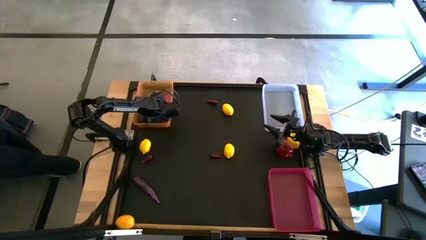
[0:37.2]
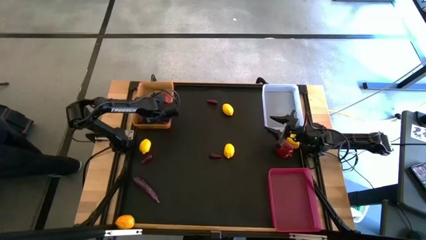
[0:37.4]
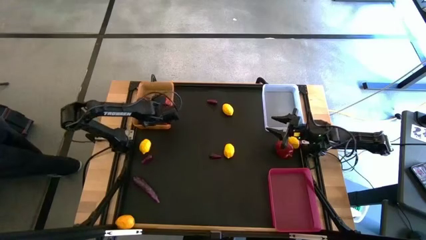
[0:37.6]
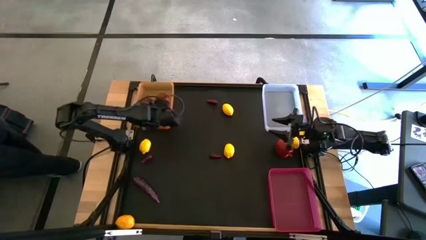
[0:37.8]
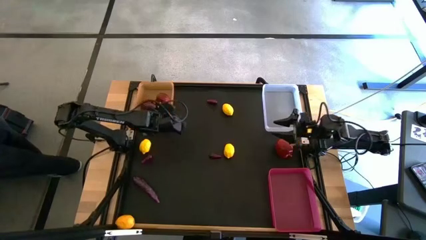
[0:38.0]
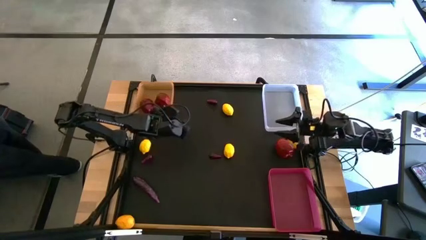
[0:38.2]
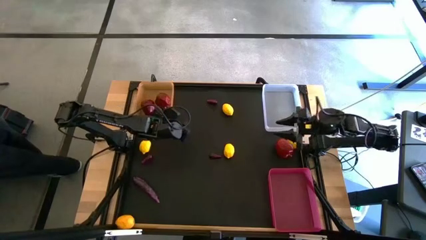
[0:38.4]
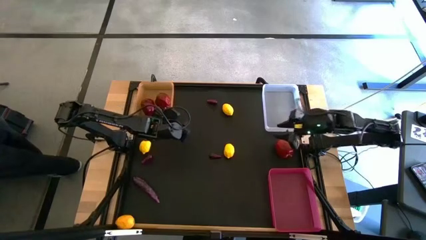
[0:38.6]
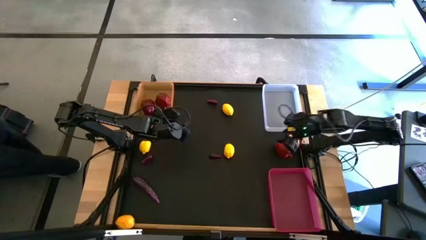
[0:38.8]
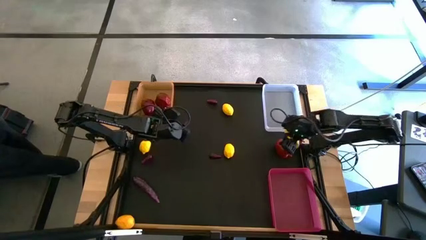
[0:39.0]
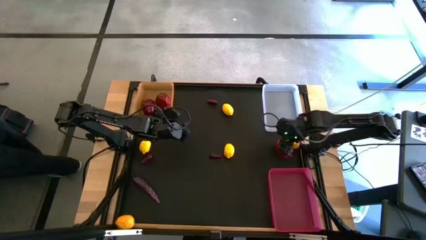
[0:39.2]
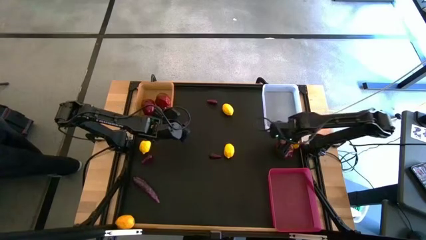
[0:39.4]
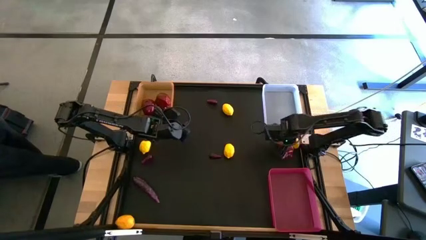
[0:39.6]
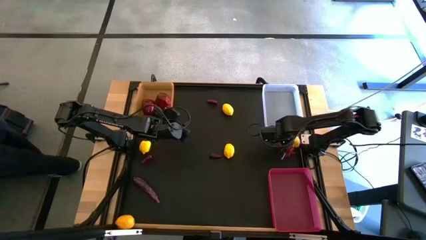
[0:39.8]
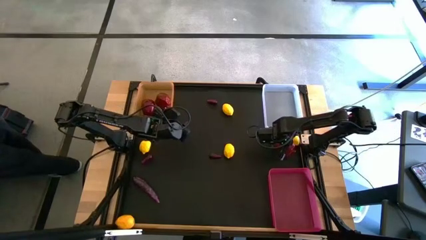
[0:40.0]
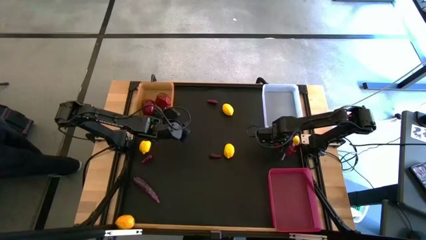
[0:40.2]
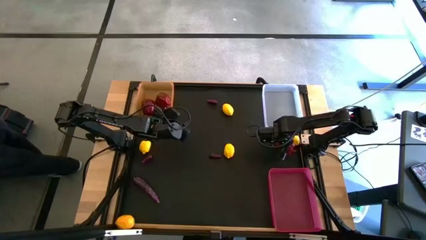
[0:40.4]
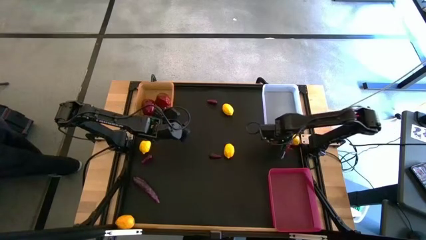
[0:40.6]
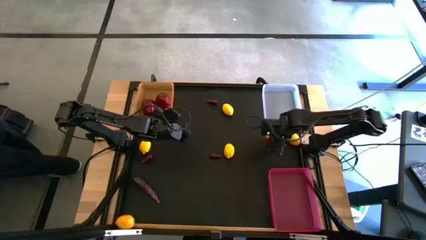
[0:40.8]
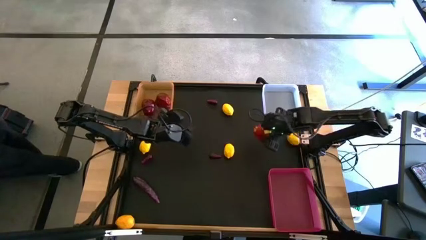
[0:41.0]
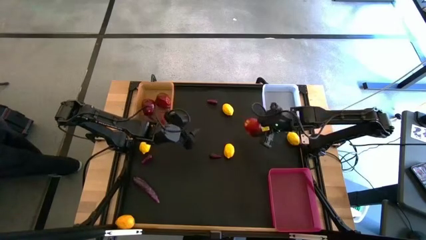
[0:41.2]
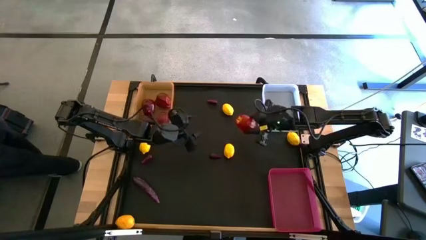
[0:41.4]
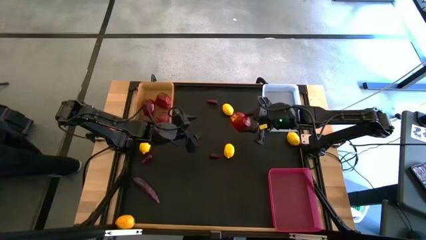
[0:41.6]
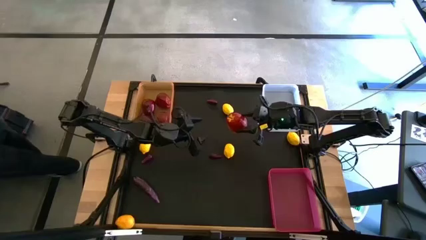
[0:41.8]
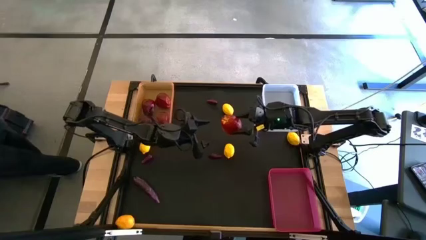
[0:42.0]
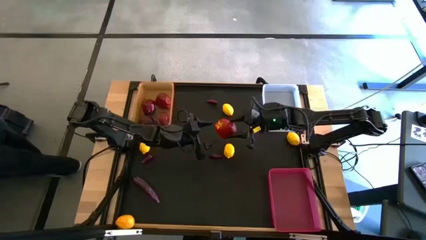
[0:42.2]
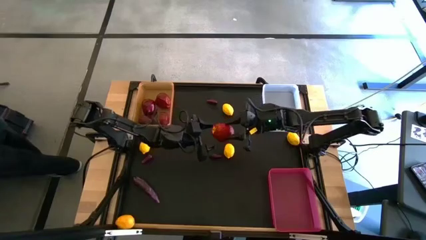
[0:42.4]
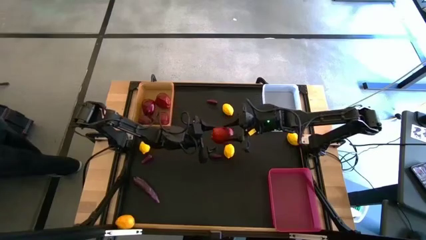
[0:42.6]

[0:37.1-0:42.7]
Task: Sort produce into baskets
Put the apple into the orange bin

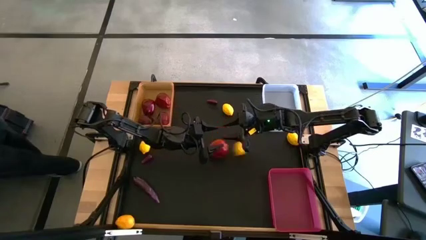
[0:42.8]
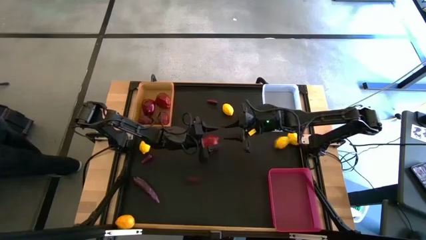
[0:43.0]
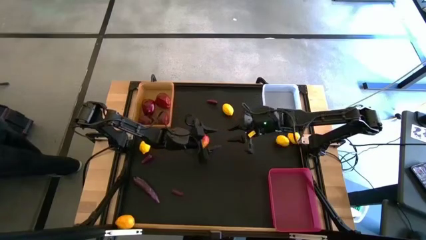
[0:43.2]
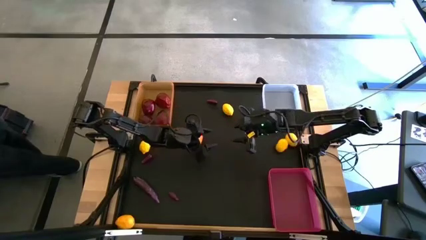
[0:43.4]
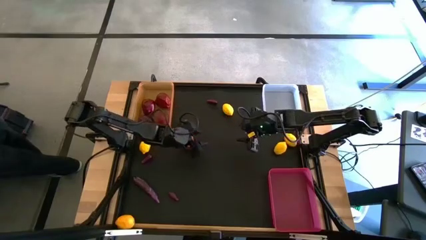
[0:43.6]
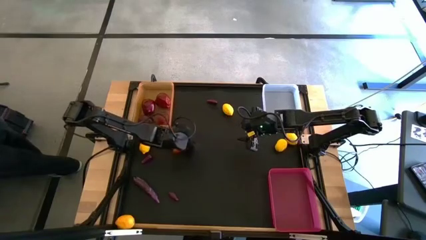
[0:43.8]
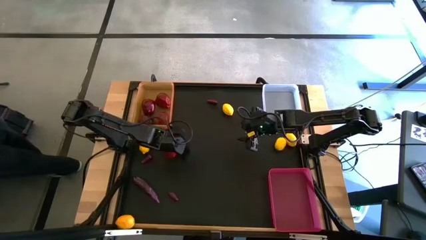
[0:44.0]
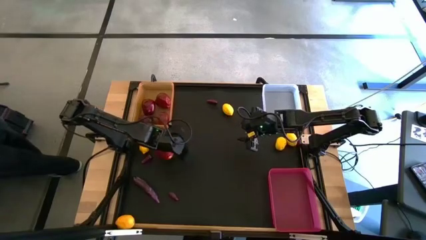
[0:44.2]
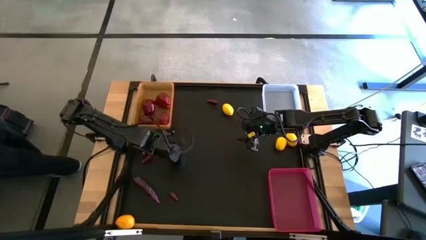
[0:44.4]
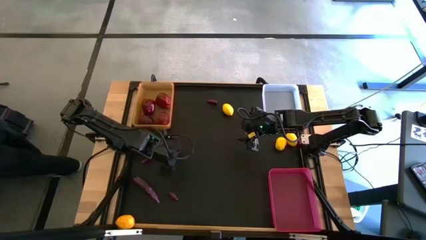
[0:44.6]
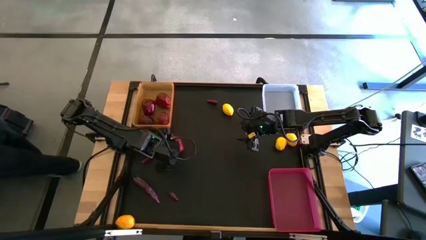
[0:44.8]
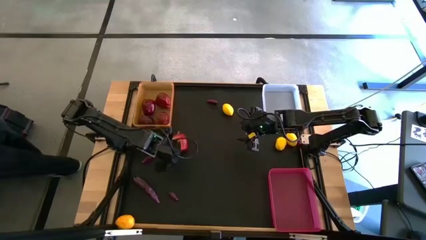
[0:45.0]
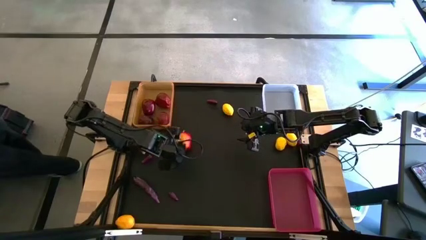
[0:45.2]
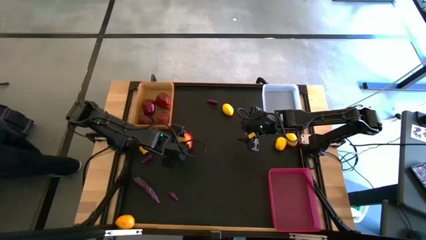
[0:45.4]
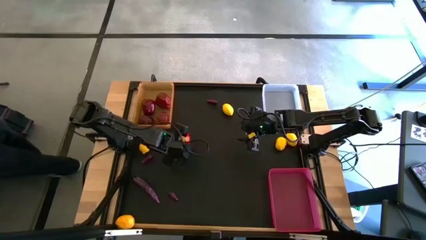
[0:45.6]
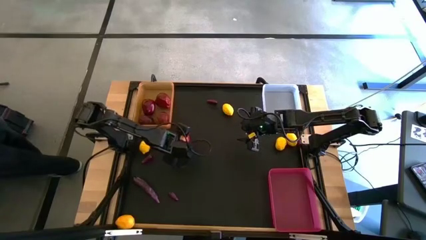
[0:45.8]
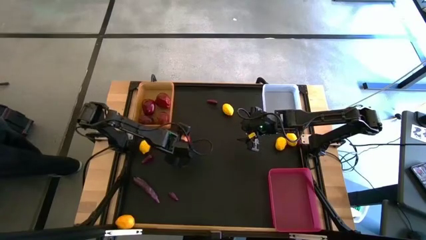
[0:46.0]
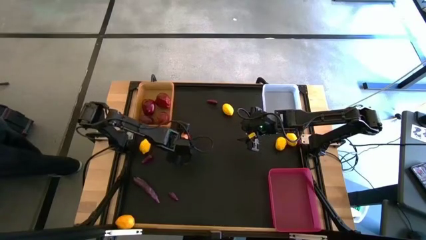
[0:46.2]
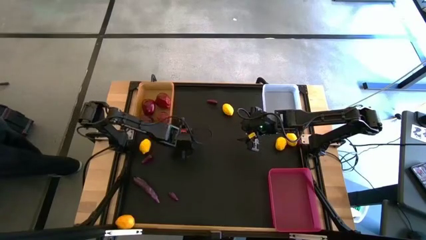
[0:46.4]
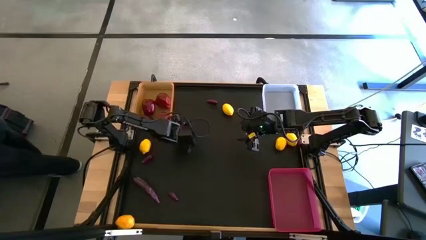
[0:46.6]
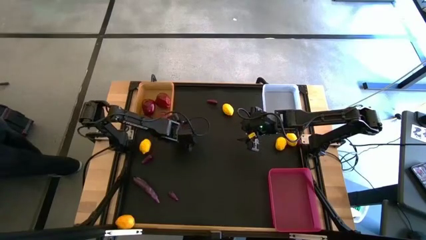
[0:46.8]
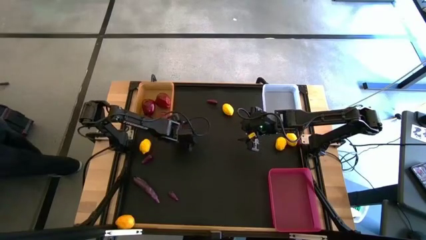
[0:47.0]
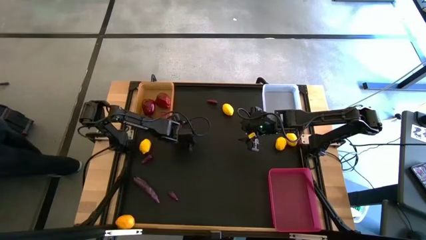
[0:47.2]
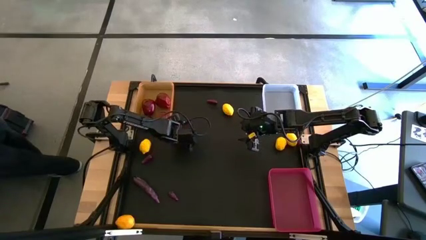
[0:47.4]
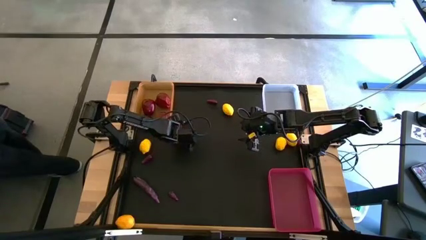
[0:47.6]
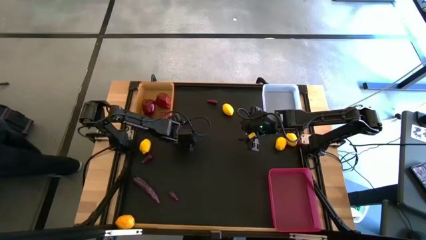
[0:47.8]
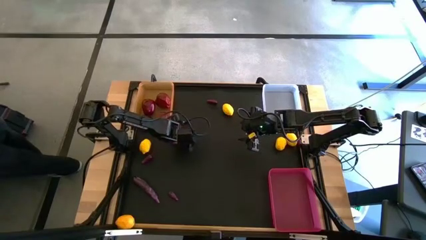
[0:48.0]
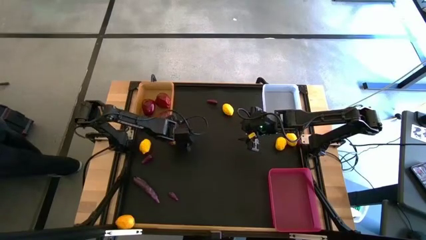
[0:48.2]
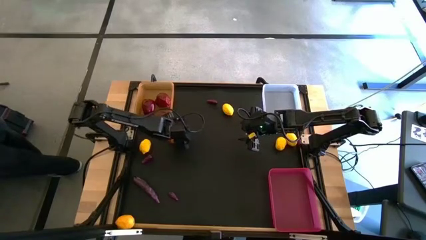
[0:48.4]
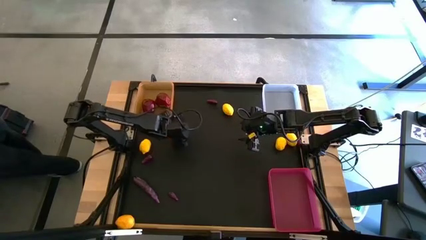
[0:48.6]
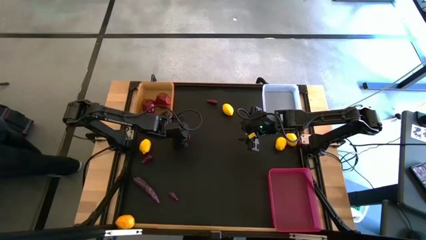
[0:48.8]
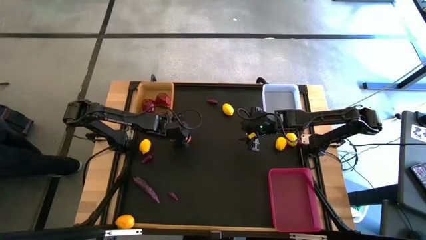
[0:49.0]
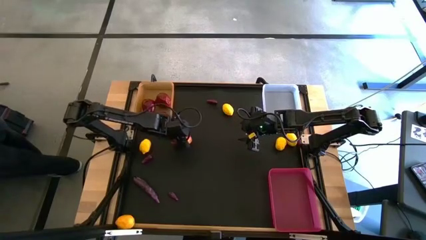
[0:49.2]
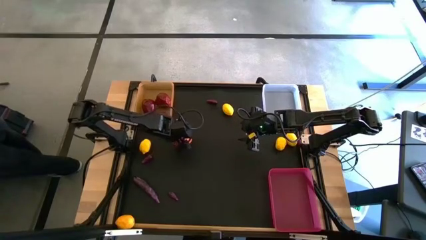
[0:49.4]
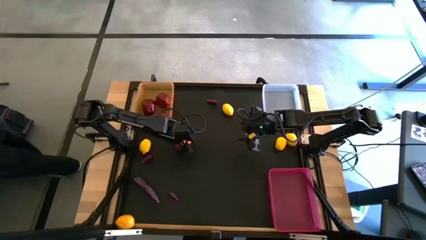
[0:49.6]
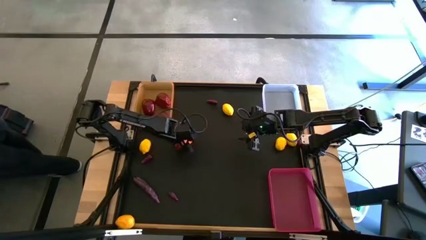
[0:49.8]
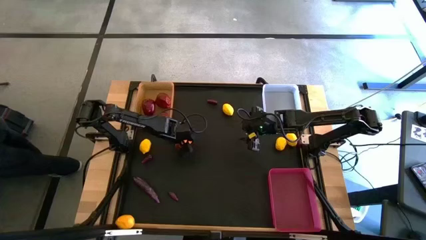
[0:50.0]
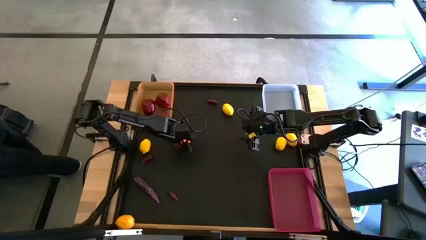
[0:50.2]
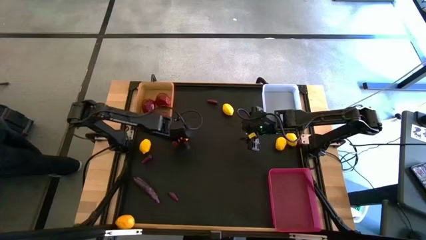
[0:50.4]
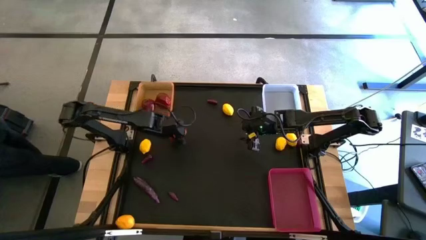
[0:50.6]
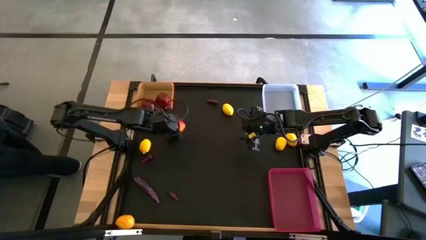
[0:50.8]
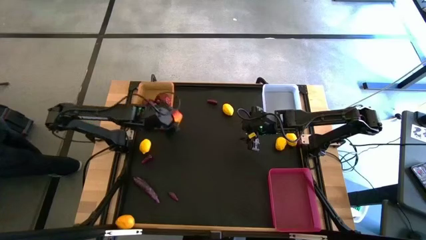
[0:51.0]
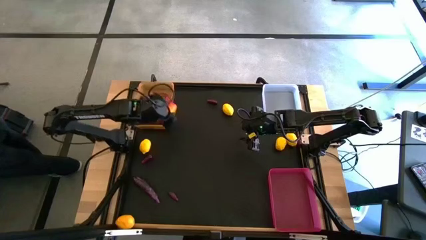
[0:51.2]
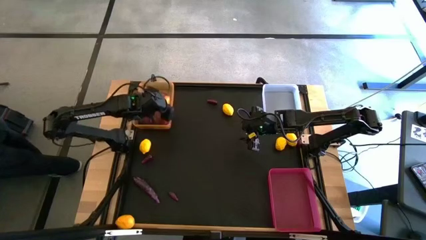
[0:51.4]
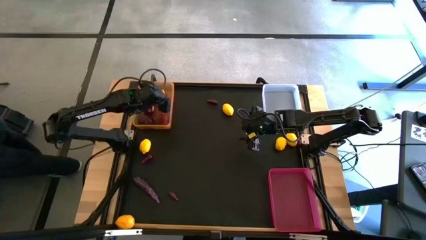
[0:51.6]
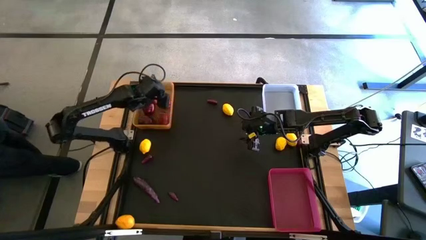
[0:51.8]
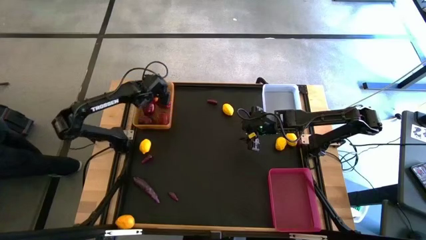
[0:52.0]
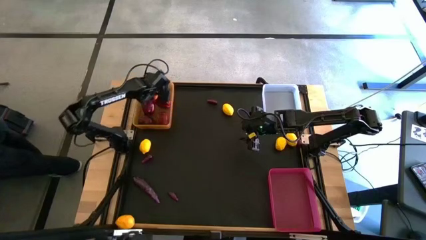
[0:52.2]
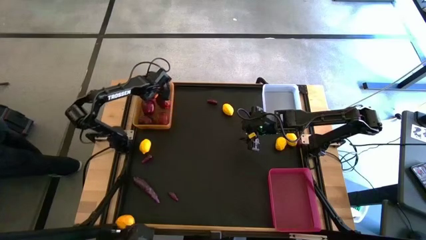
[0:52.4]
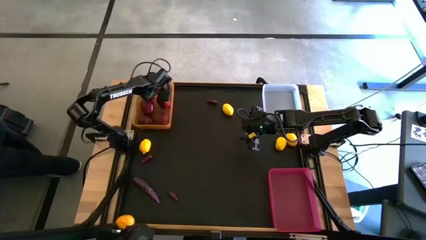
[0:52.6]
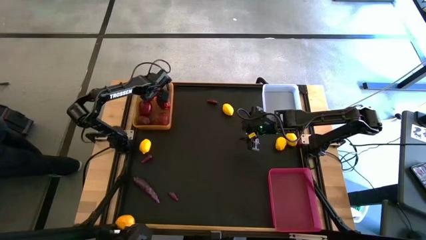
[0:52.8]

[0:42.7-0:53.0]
Put the apple into the orange bin
